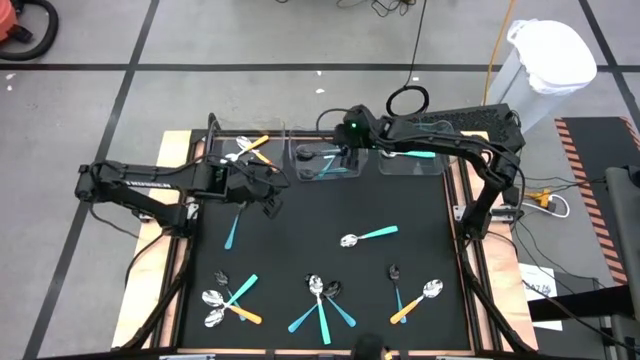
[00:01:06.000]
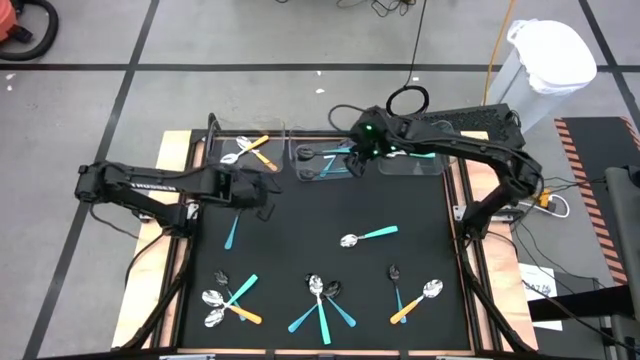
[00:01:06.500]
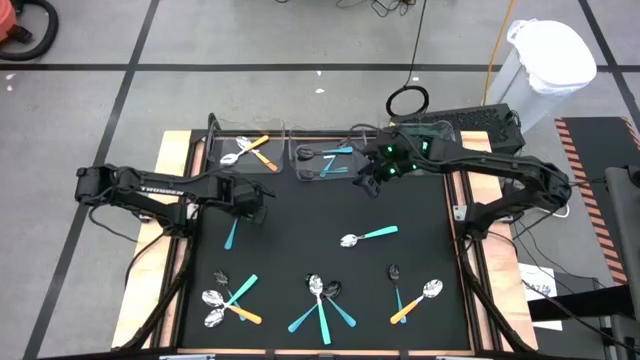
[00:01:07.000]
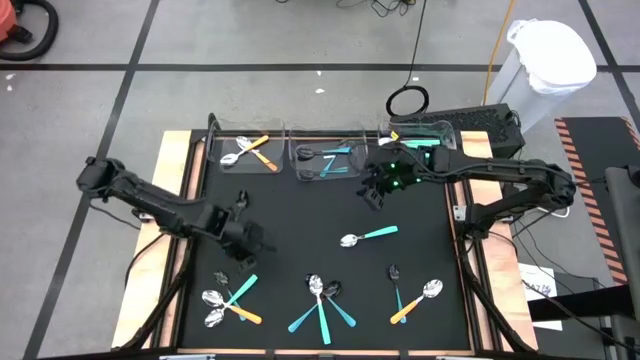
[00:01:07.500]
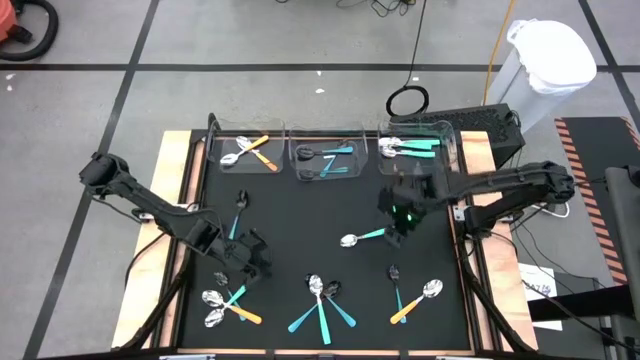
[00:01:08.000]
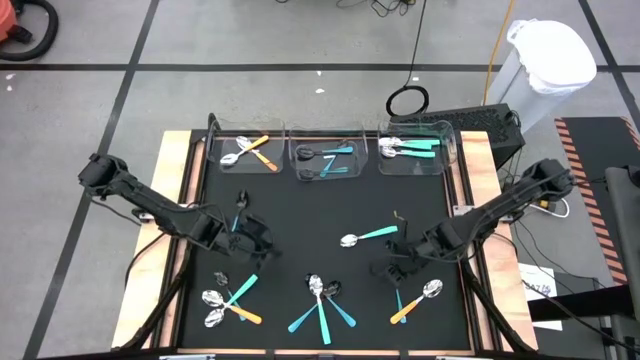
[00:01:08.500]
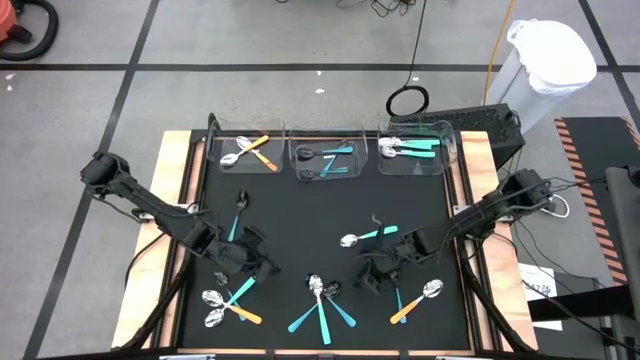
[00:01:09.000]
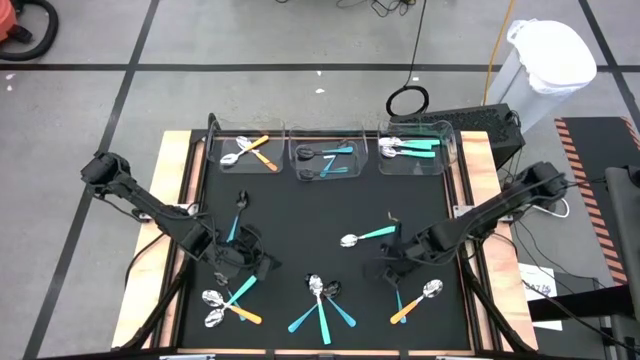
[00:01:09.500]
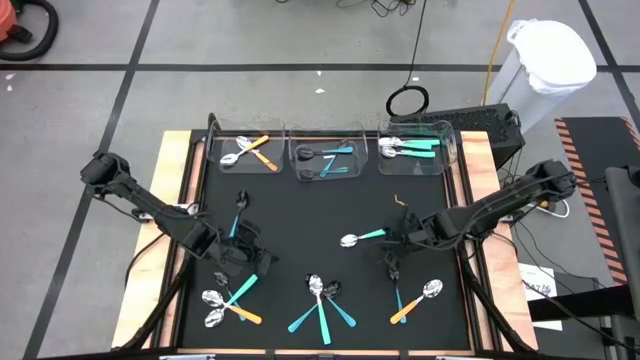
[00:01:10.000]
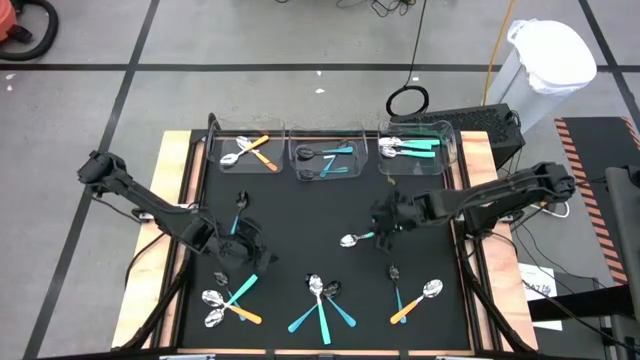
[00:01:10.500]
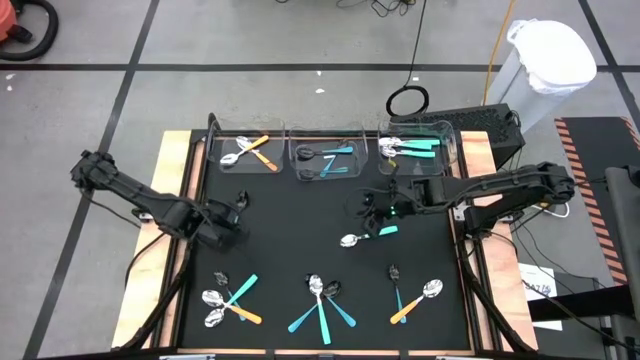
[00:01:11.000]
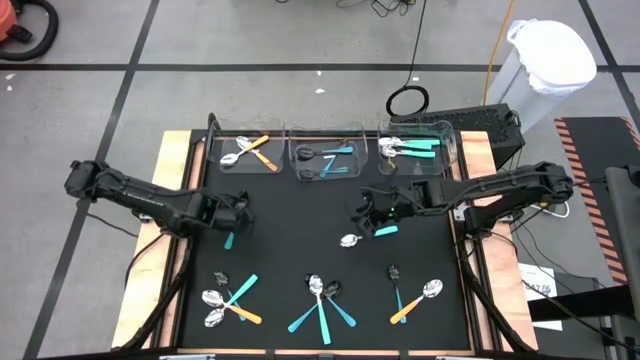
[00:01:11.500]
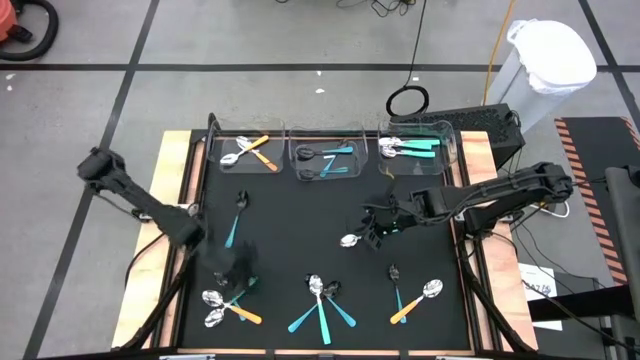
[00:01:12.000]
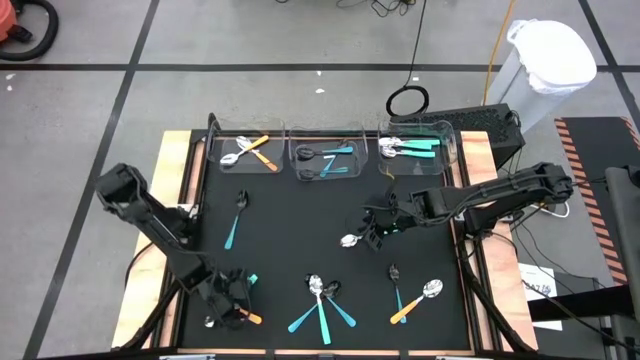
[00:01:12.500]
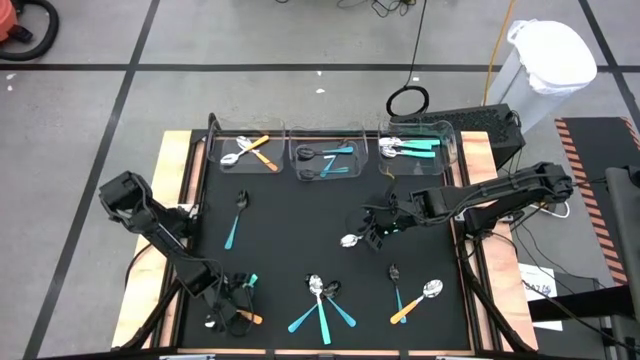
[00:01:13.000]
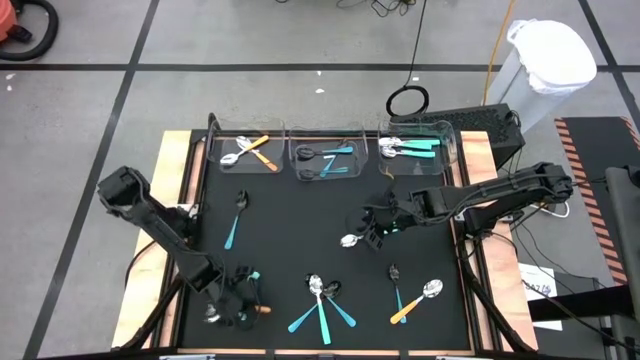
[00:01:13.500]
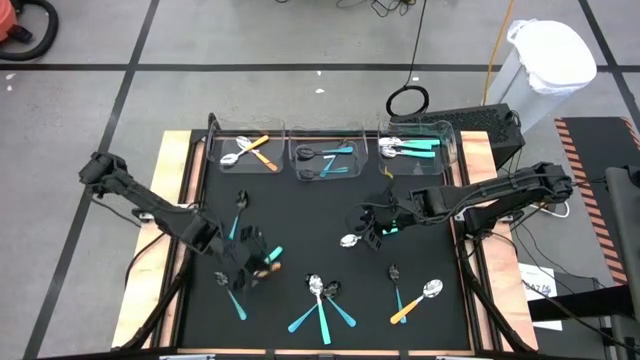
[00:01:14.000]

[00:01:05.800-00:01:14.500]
Task: Sort silverware by color (type)
Put the yellow spoon into the left transparent bin

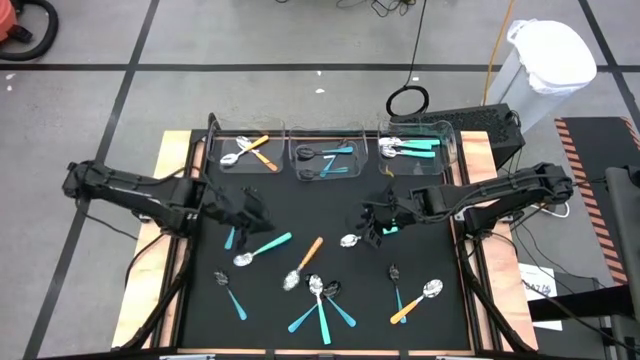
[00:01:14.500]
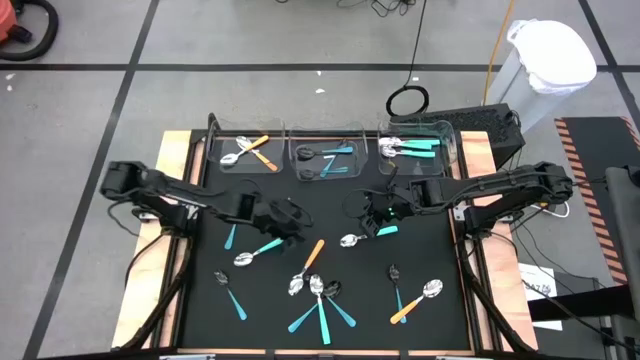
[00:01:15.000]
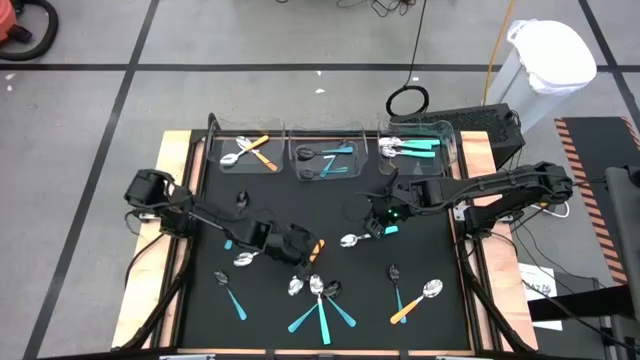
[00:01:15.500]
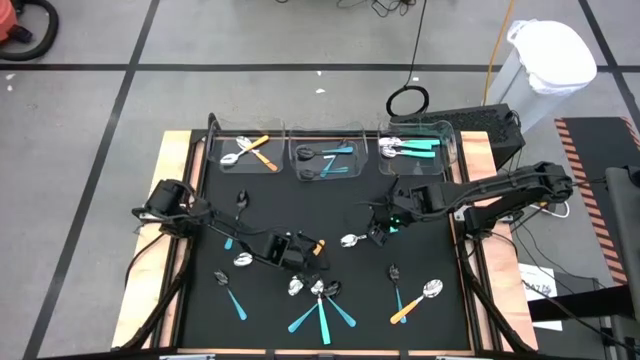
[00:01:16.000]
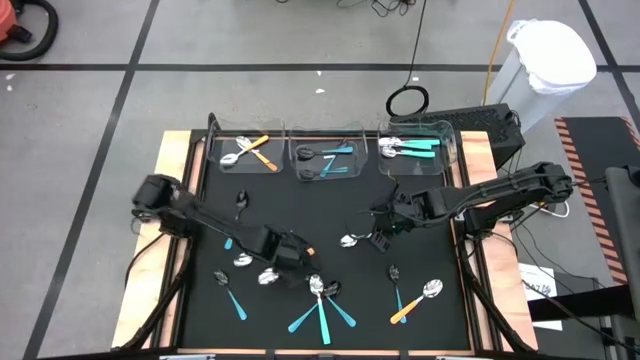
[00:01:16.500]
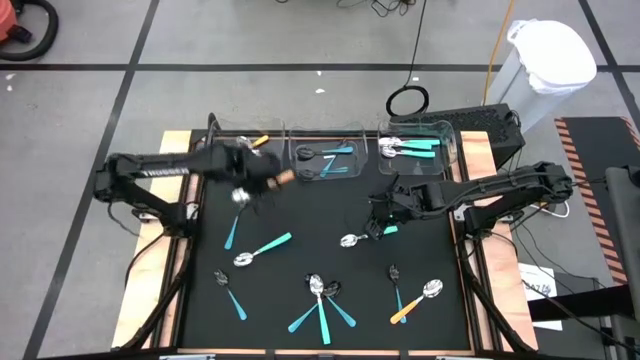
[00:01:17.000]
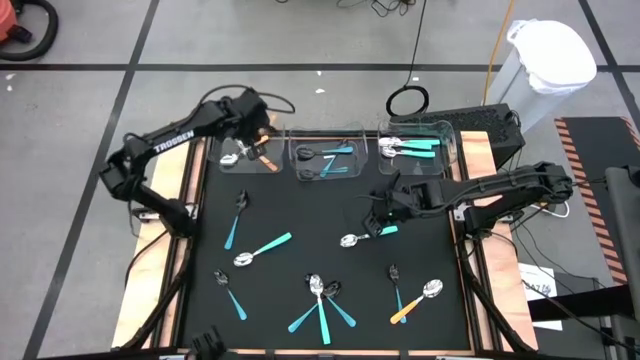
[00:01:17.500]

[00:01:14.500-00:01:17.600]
Put the yellow spoon into the left transparent bin

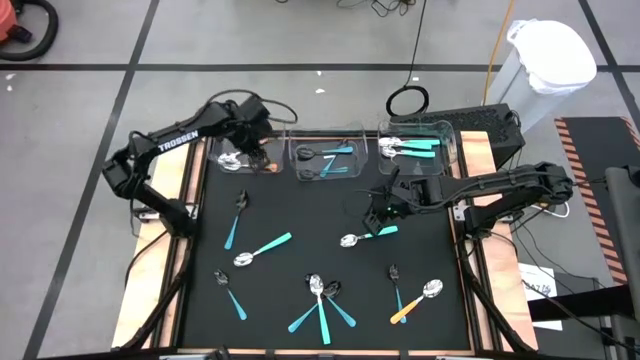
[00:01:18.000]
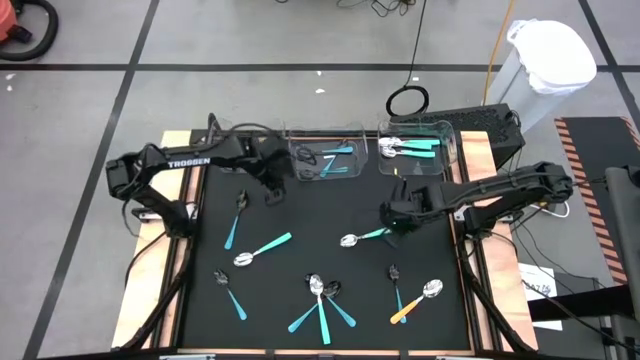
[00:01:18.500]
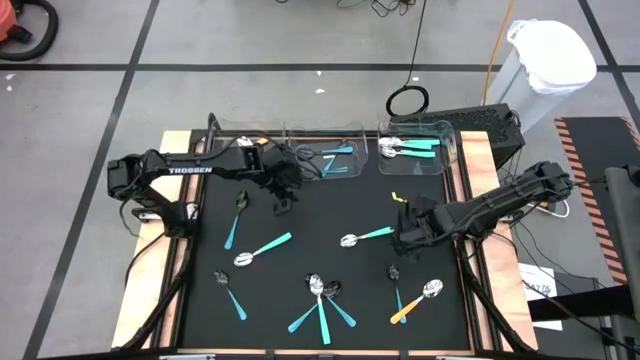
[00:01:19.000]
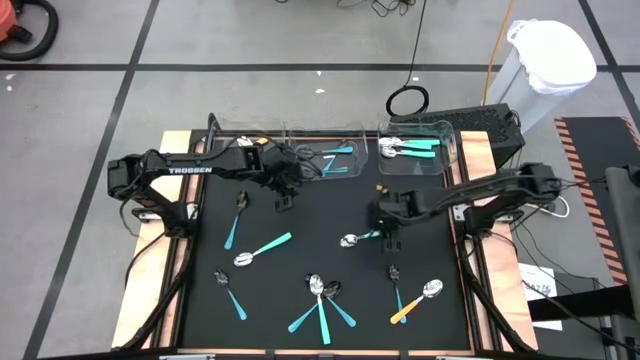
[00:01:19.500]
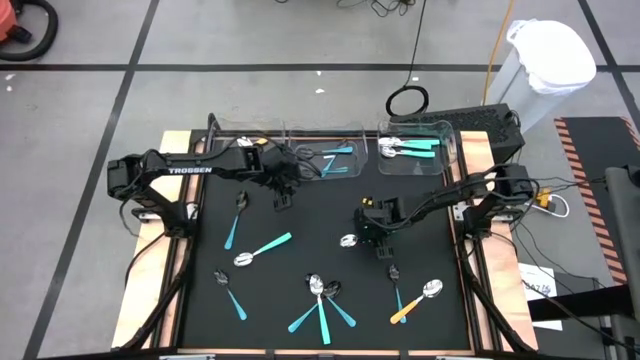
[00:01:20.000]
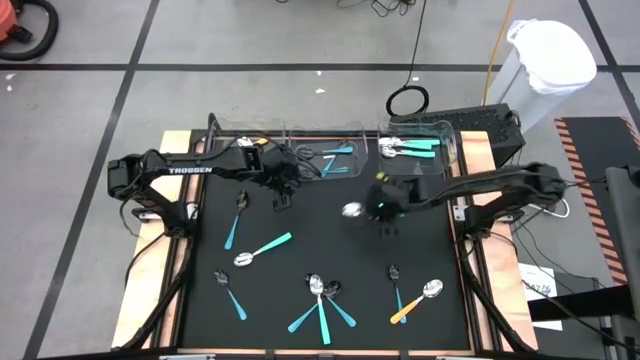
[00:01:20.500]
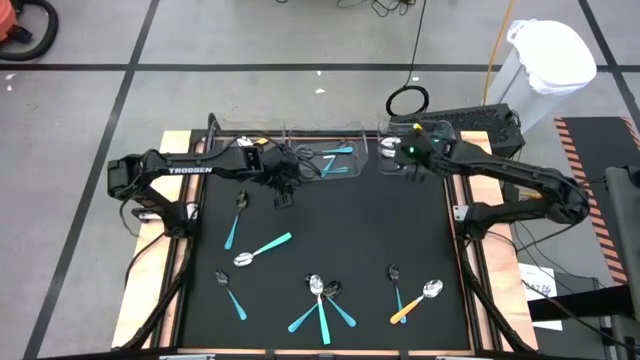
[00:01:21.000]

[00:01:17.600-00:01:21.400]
Put the light green spoon into the right transparent bin

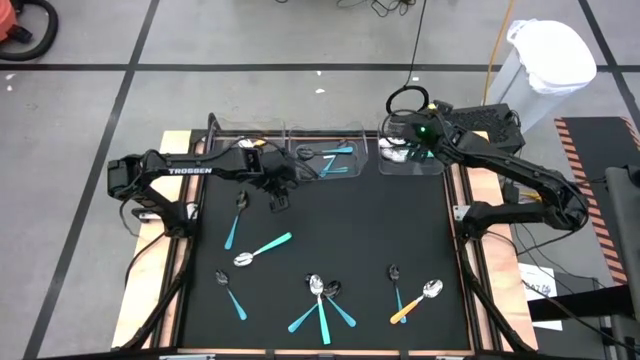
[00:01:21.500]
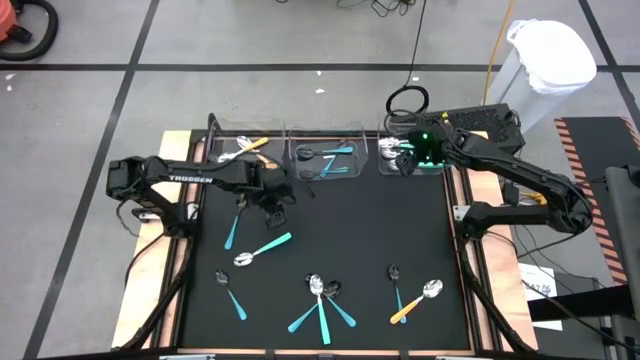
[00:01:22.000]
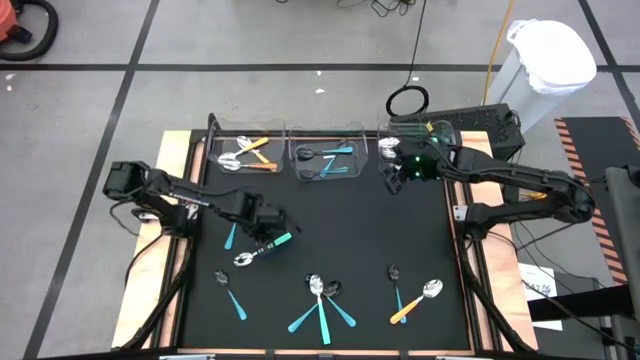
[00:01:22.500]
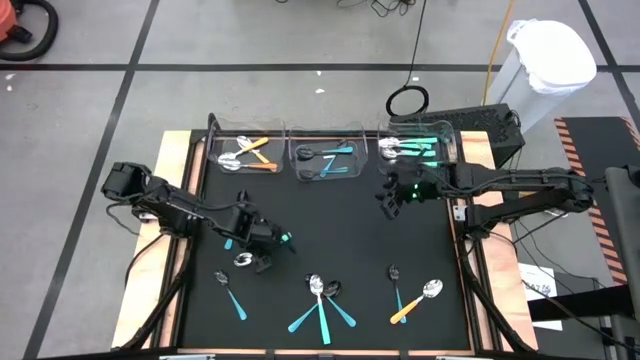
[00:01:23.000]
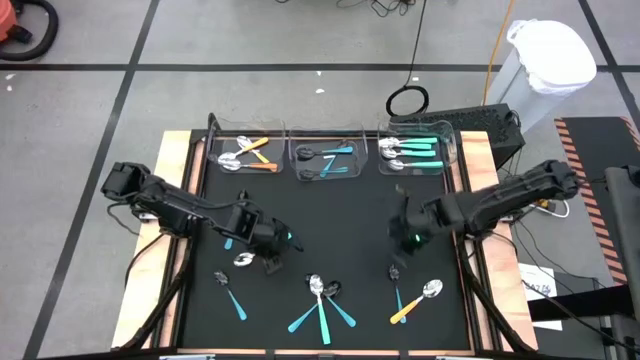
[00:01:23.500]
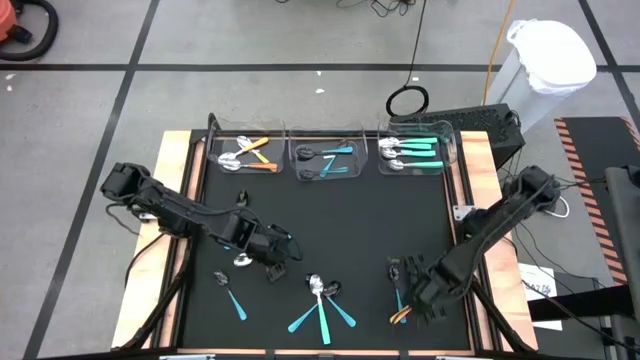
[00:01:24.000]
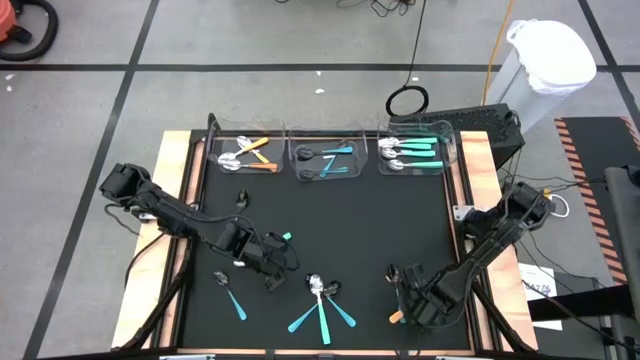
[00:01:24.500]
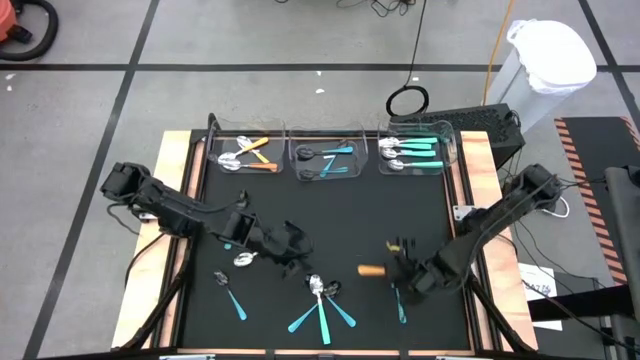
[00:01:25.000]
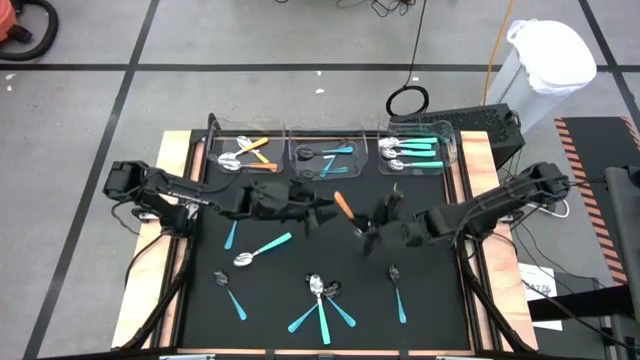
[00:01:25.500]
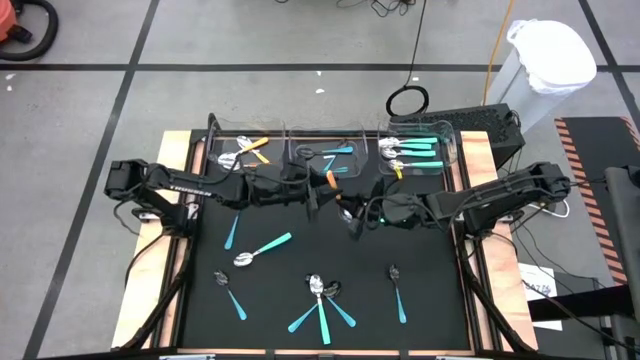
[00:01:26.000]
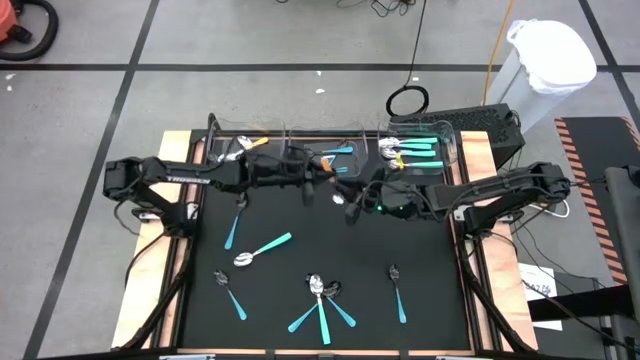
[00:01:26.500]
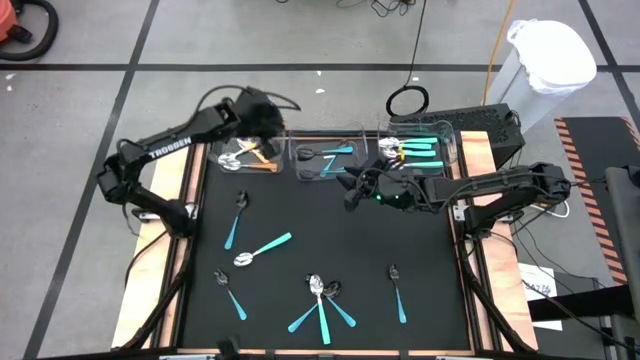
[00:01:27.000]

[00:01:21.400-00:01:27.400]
Put the yellow spoon into the left transparent bin
